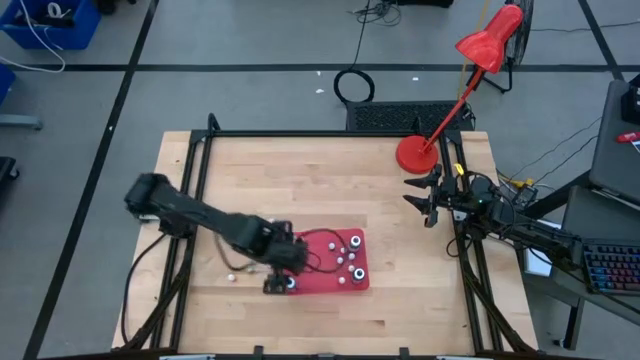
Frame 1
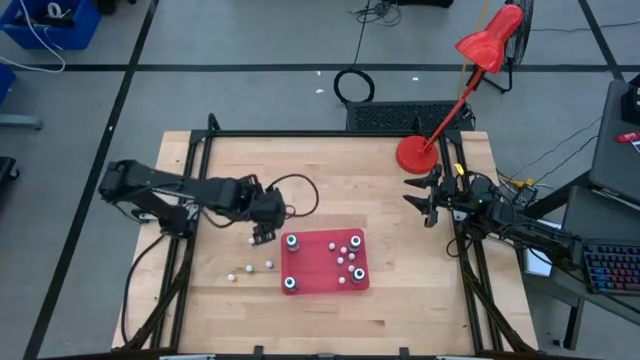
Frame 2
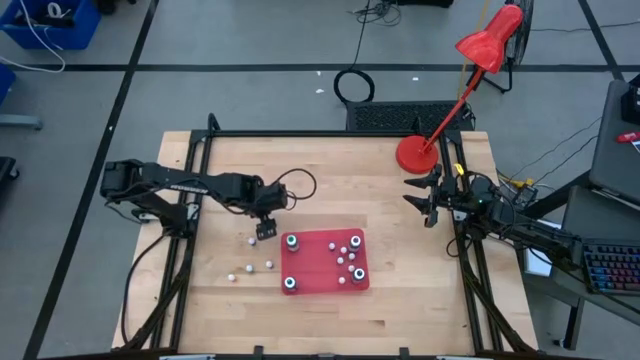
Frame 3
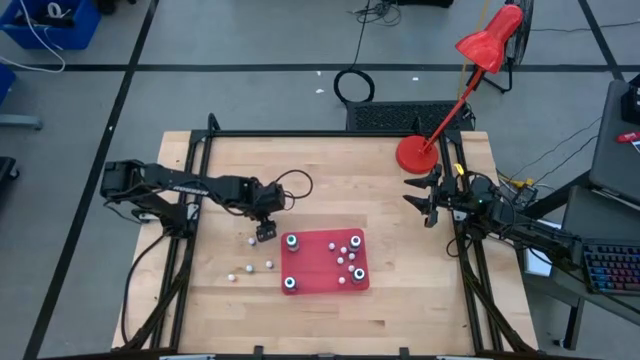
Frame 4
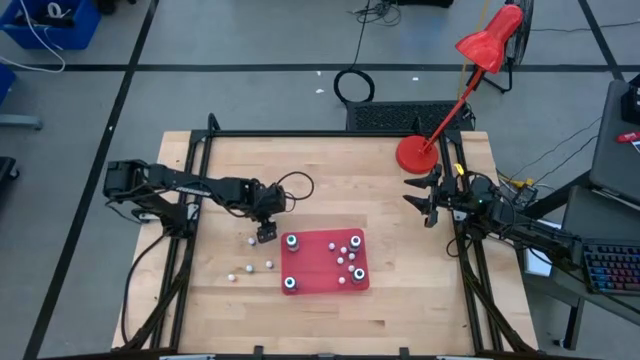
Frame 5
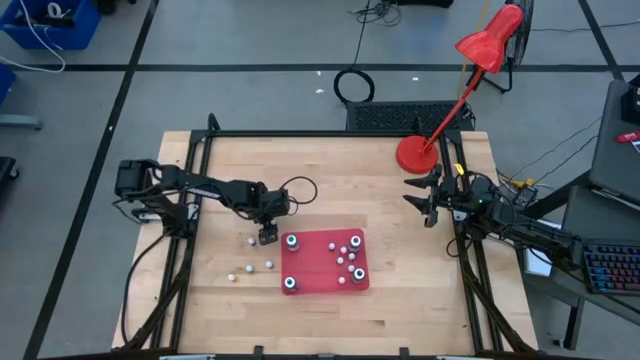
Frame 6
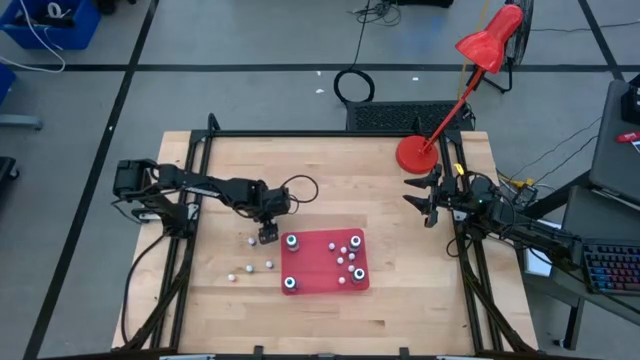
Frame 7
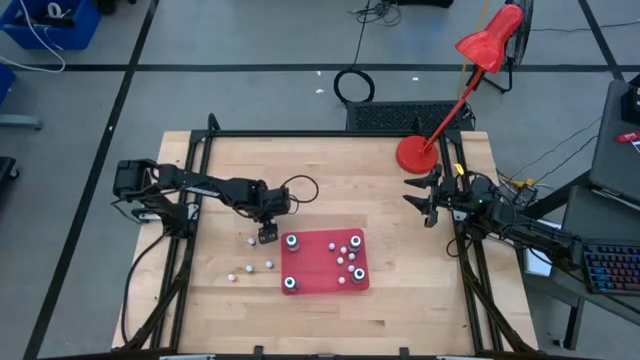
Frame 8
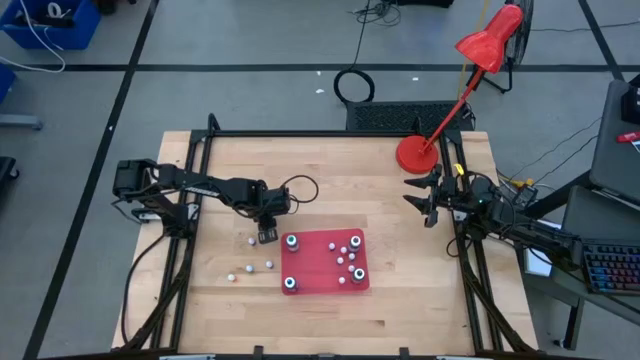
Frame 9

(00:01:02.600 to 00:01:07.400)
Task: Pick & Place food coloring
Put the small red food coloring bottle into the pink bin

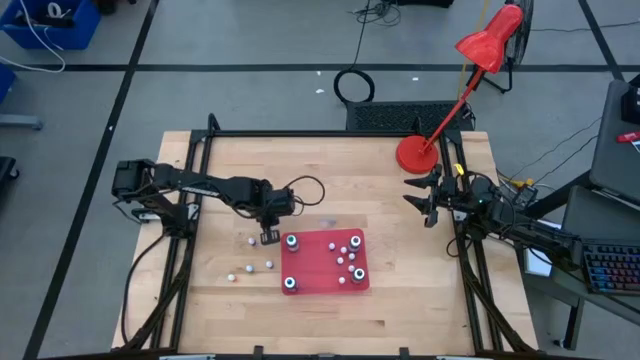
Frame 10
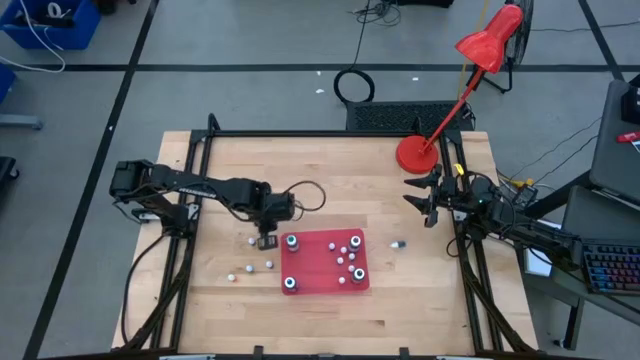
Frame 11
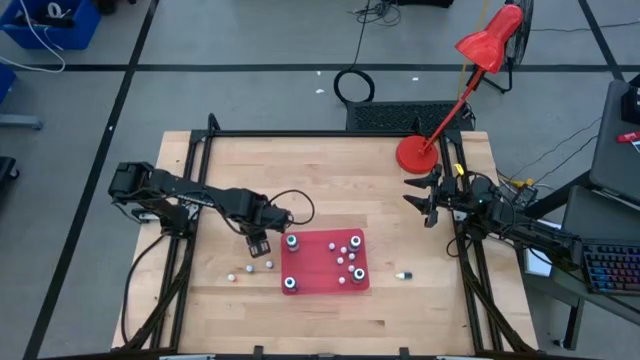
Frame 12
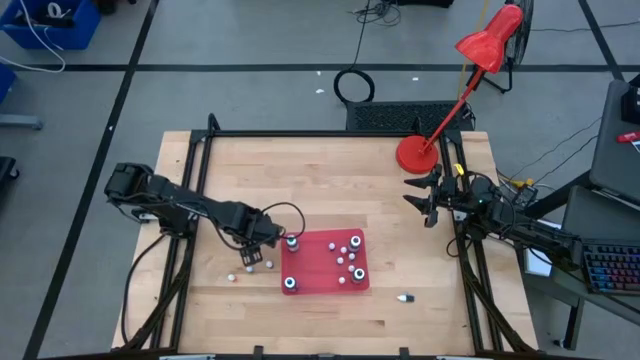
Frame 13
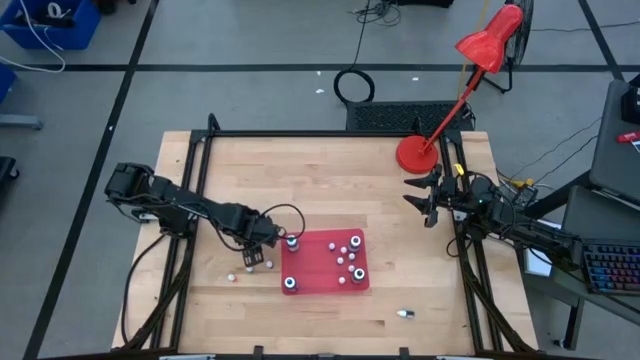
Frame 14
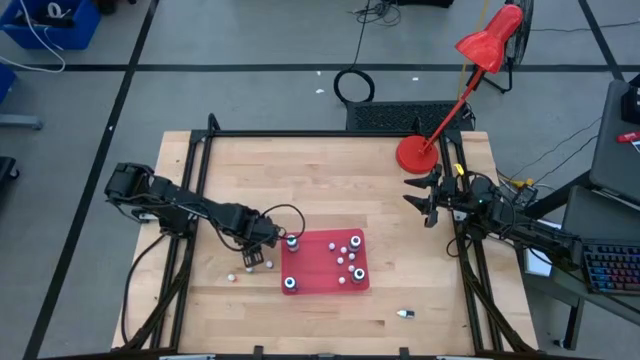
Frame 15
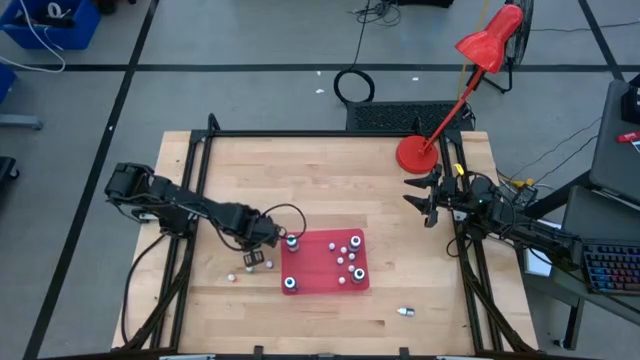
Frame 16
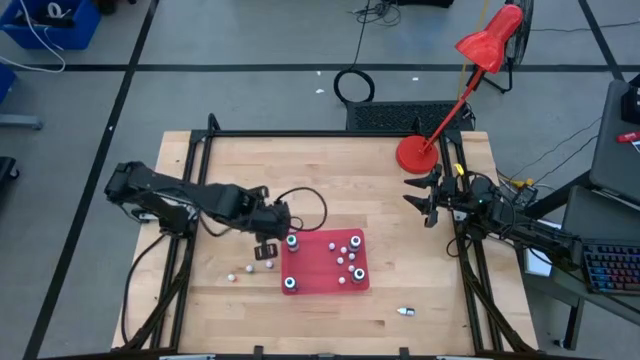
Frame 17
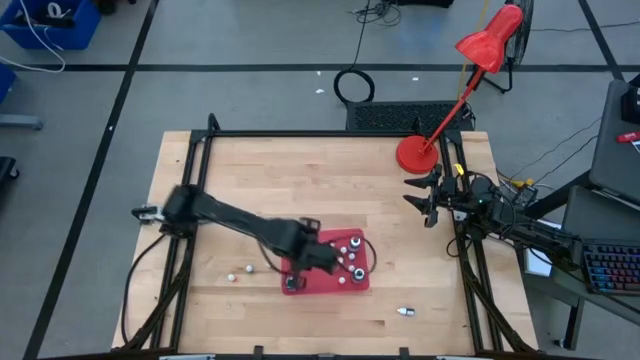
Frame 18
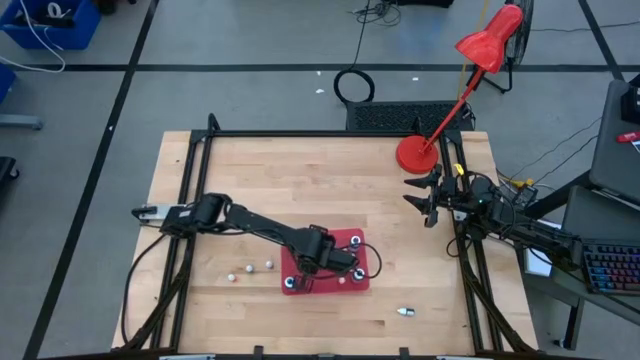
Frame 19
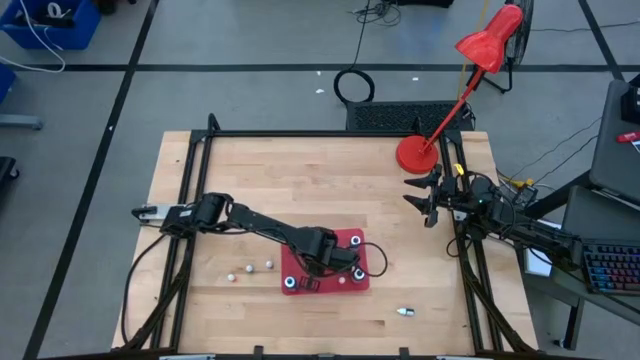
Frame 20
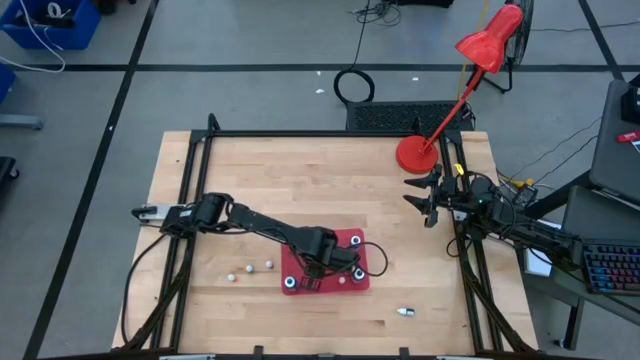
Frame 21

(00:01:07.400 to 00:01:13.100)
Put the small red food coloring bottle into the pink bin

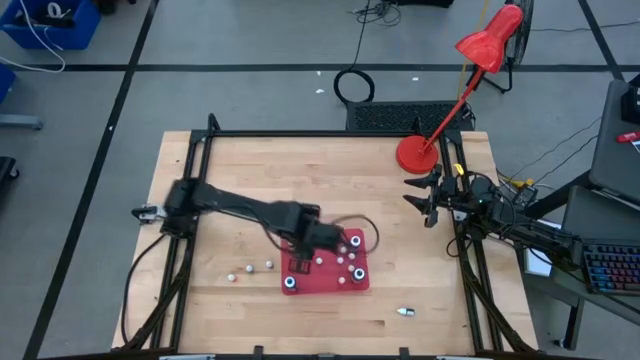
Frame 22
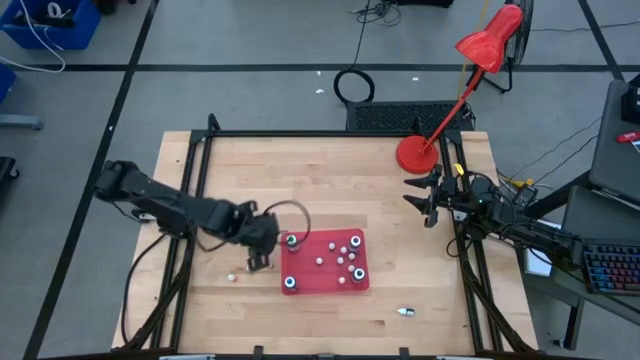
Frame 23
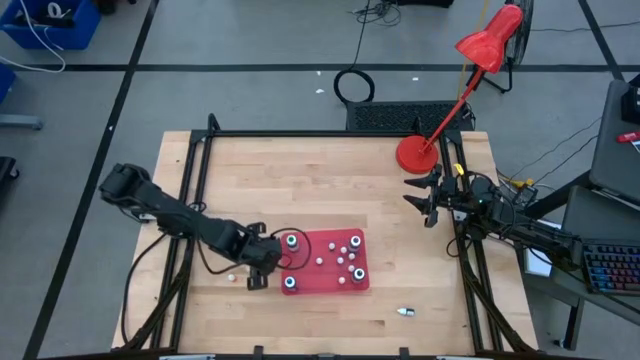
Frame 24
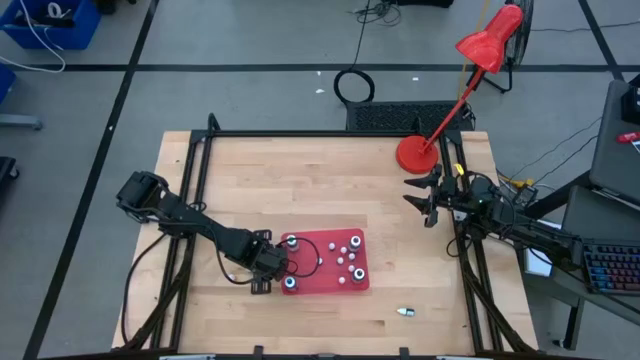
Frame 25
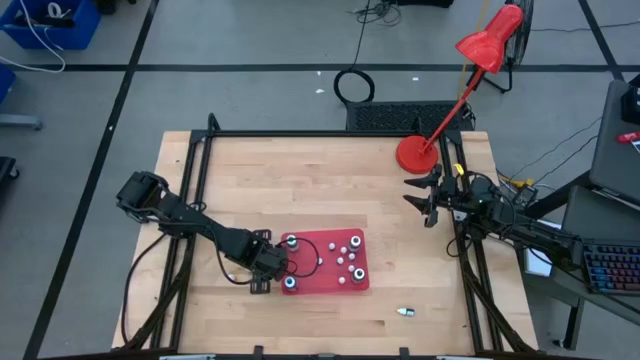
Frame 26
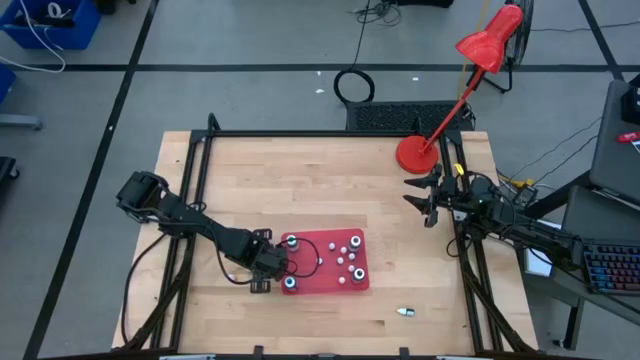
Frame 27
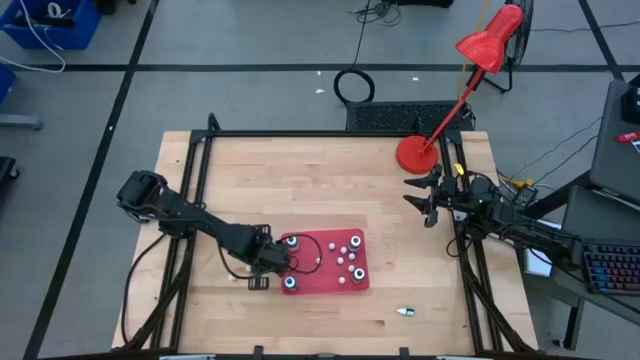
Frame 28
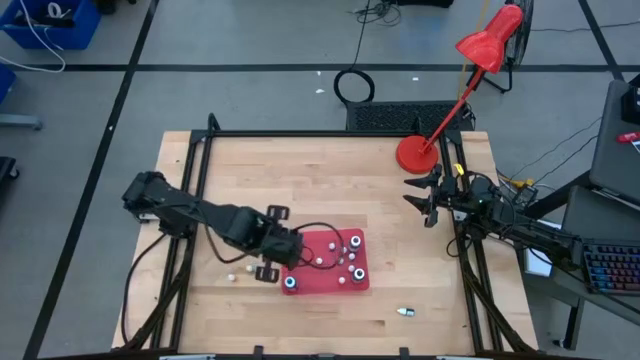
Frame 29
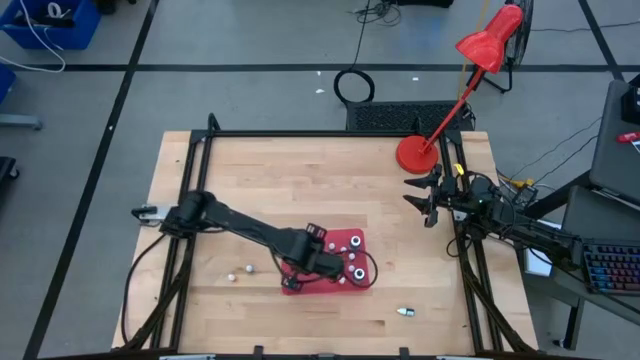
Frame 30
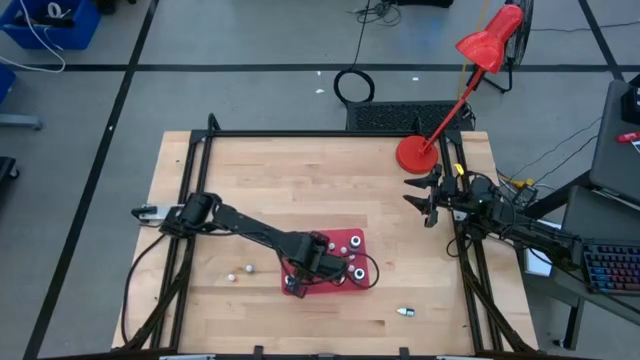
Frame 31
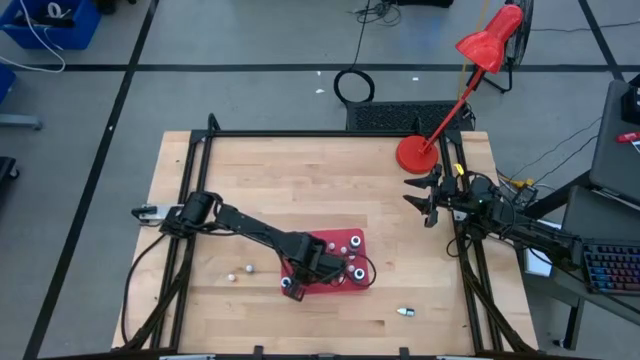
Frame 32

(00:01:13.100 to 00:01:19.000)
Put the small red food coloring bottle into the pink bin

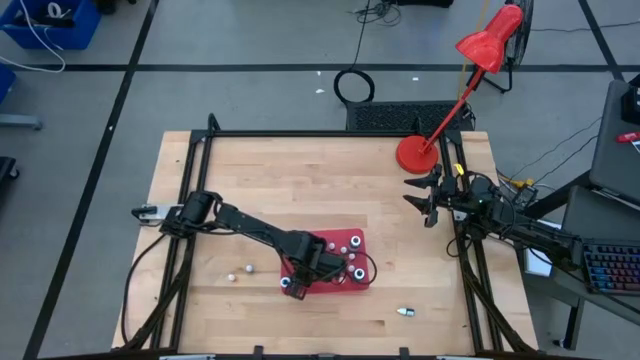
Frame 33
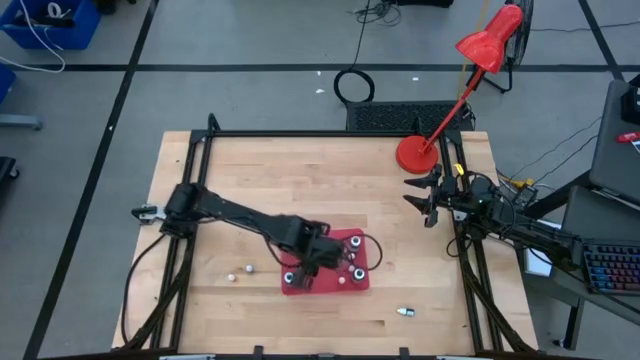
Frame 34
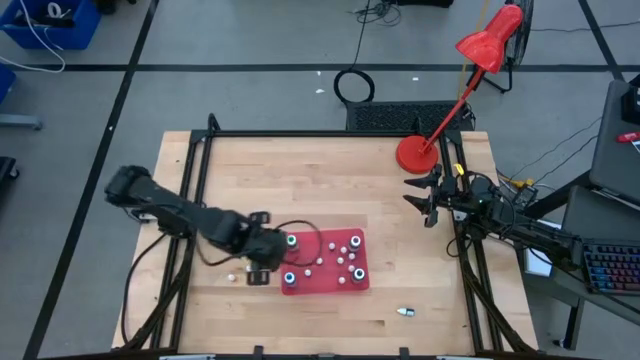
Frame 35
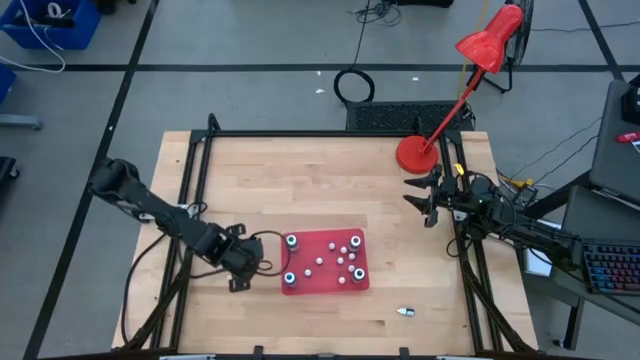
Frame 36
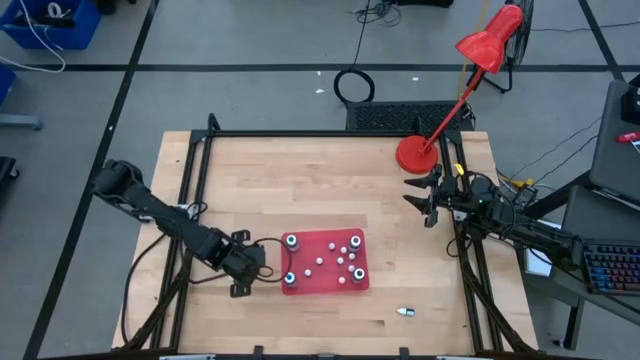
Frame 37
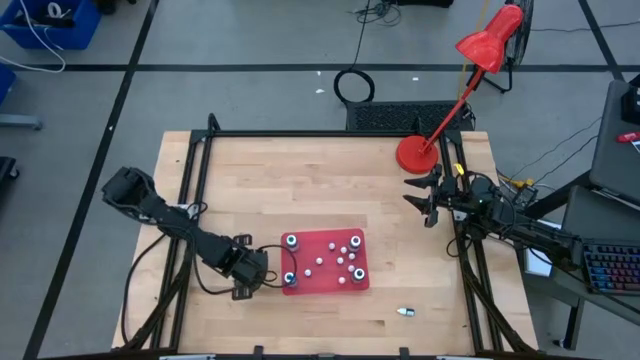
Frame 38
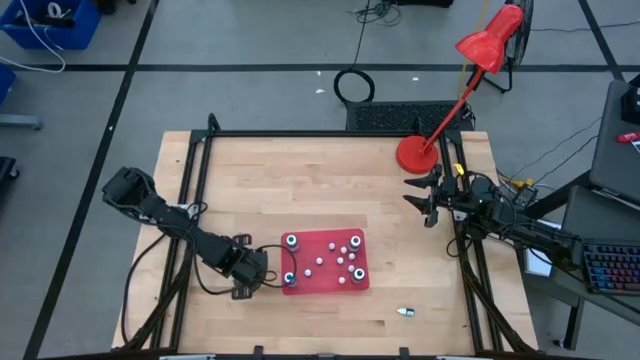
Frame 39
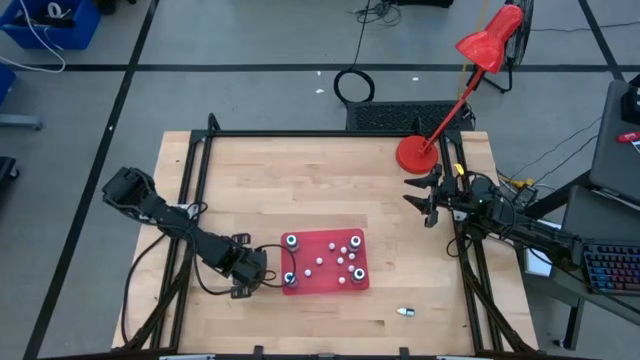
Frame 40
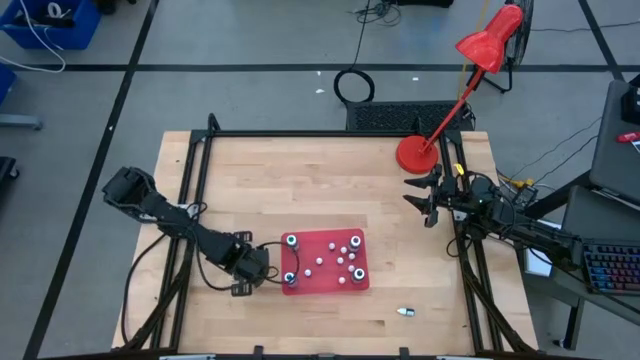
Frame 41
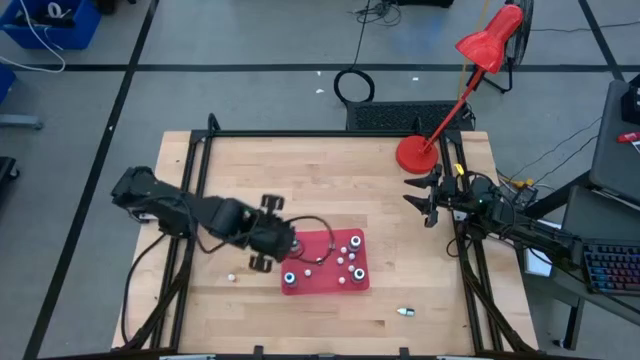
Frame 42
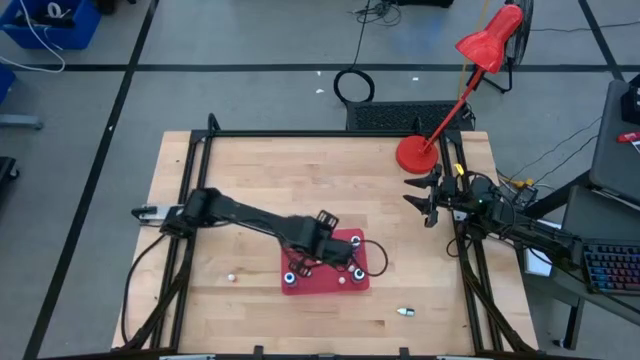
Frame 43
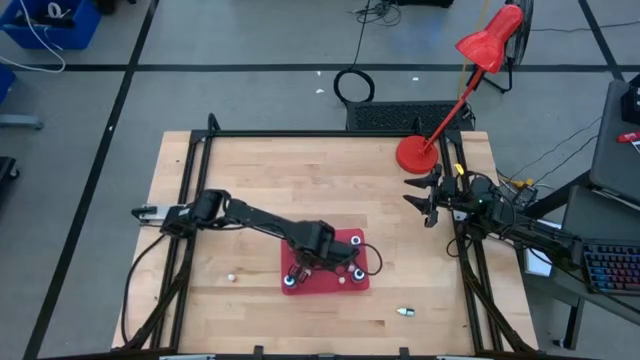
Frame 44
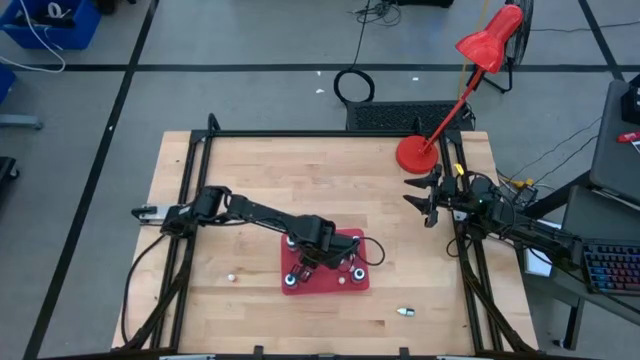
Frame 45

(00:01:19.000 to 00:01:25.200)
Put the small purple food coloring bottle into the pink bin
